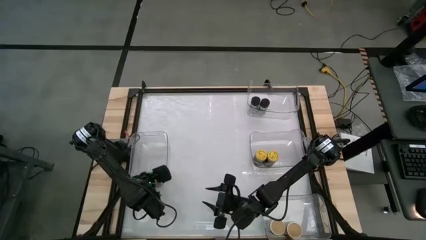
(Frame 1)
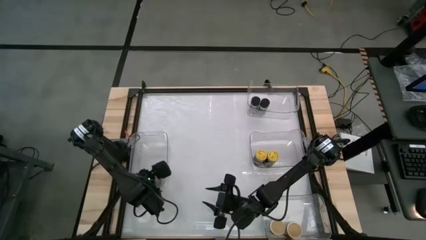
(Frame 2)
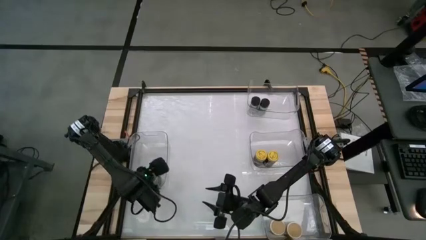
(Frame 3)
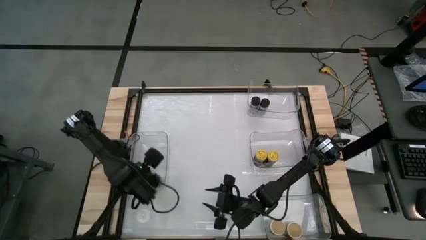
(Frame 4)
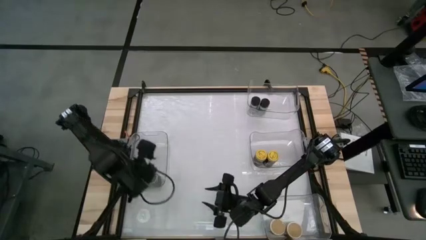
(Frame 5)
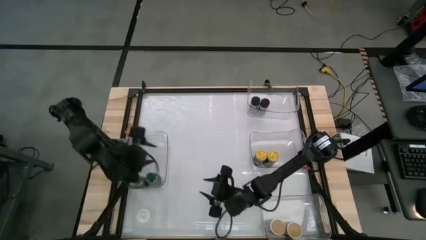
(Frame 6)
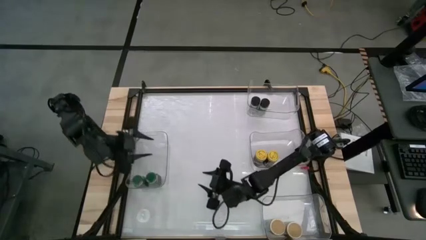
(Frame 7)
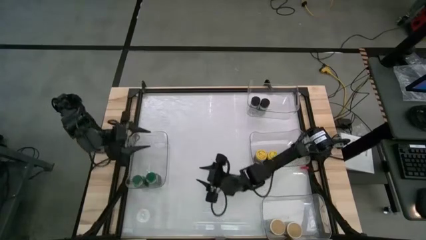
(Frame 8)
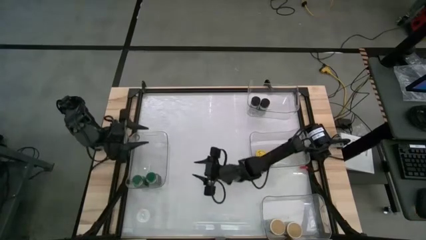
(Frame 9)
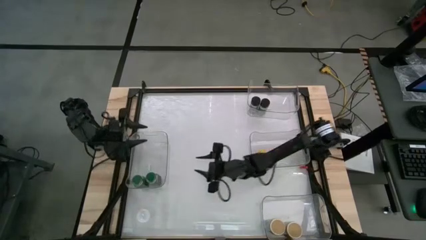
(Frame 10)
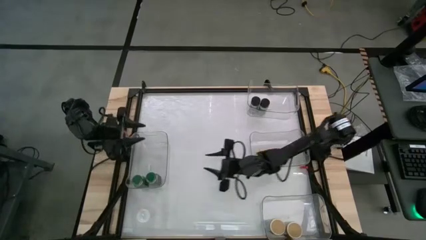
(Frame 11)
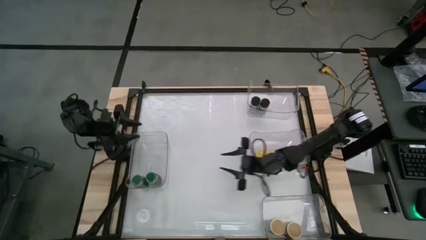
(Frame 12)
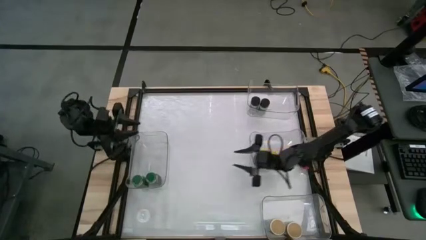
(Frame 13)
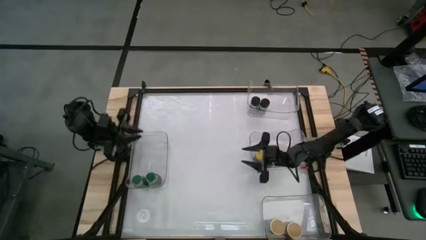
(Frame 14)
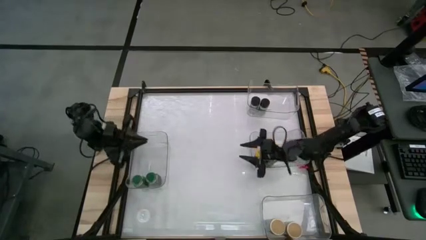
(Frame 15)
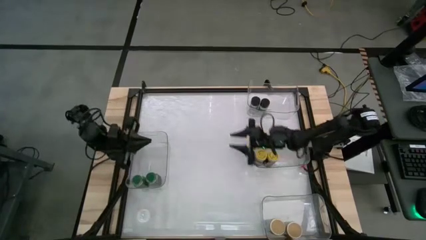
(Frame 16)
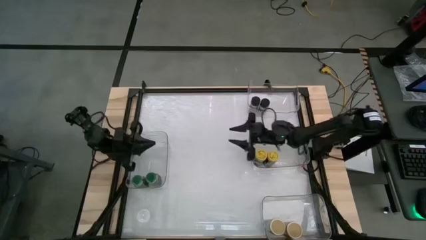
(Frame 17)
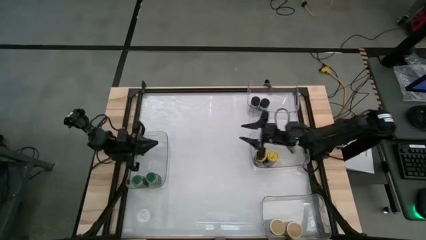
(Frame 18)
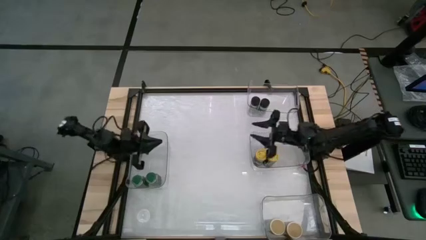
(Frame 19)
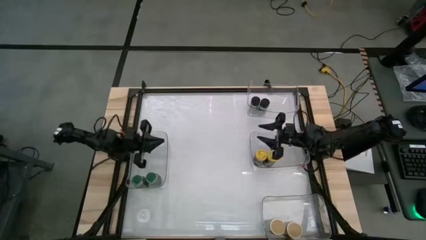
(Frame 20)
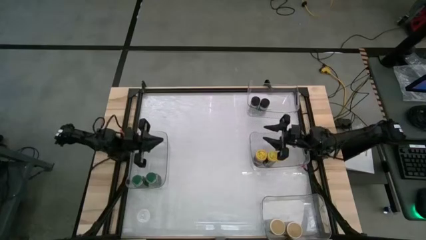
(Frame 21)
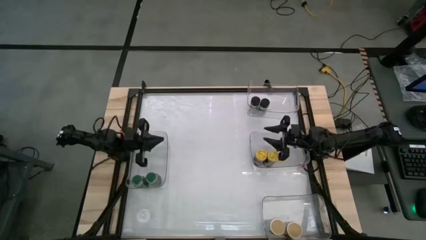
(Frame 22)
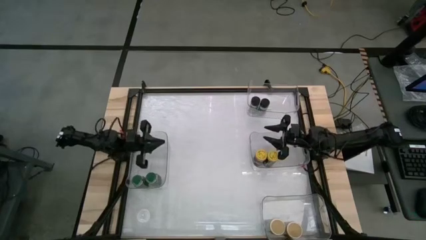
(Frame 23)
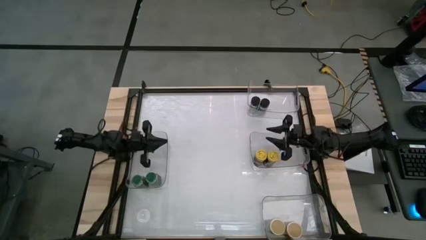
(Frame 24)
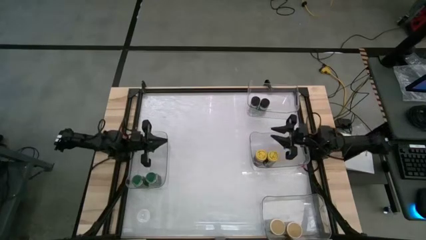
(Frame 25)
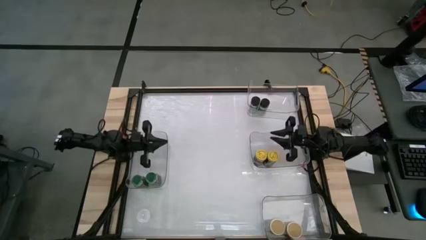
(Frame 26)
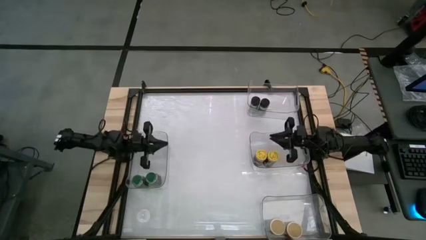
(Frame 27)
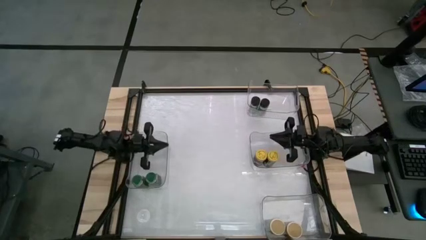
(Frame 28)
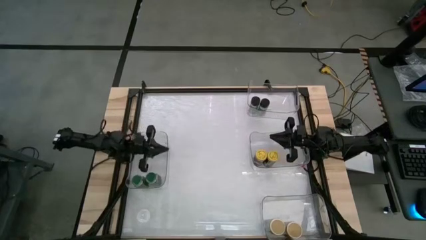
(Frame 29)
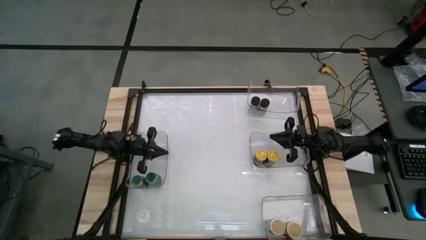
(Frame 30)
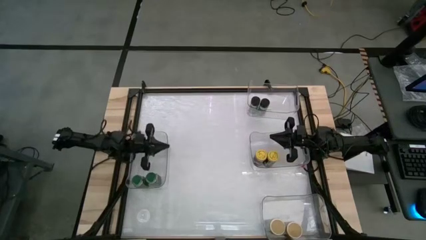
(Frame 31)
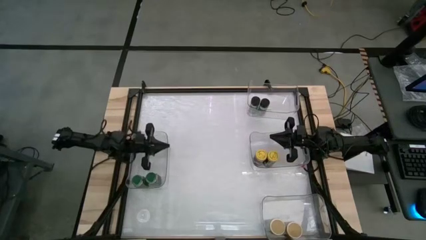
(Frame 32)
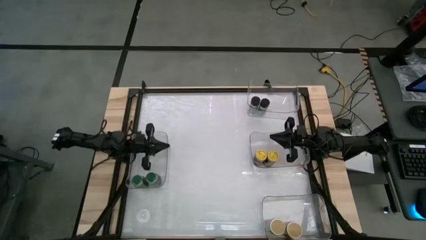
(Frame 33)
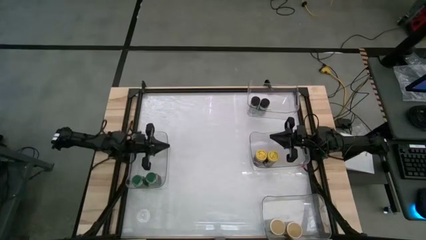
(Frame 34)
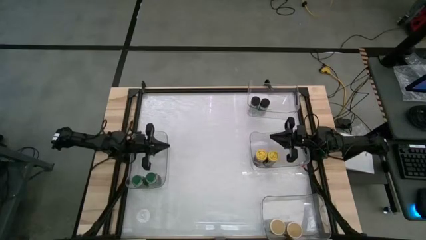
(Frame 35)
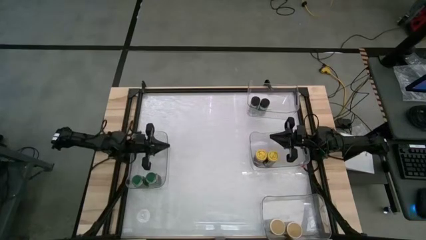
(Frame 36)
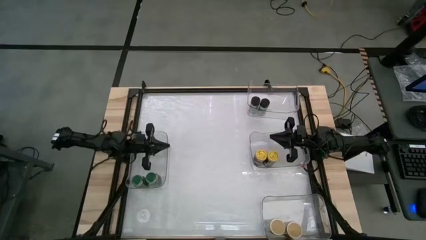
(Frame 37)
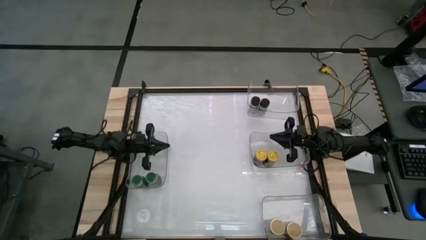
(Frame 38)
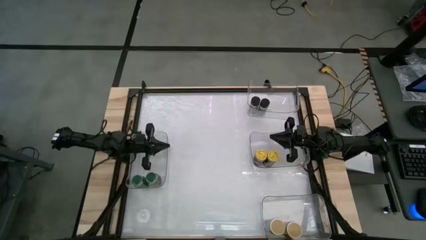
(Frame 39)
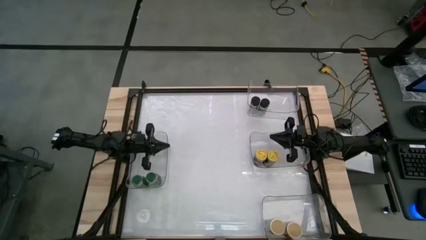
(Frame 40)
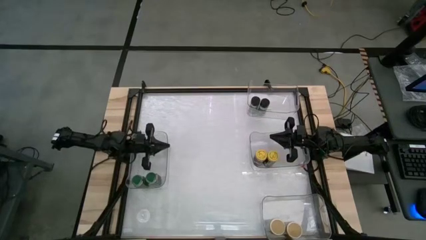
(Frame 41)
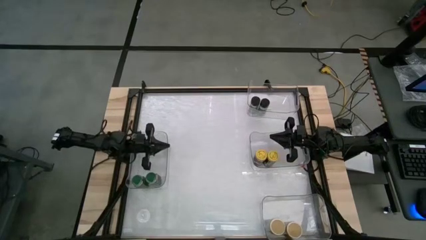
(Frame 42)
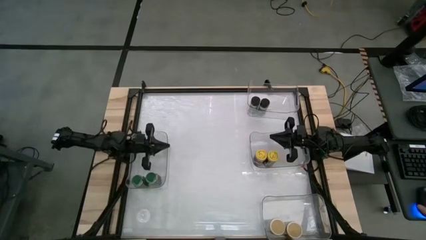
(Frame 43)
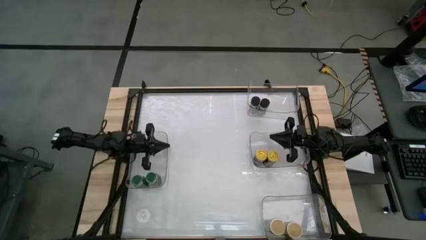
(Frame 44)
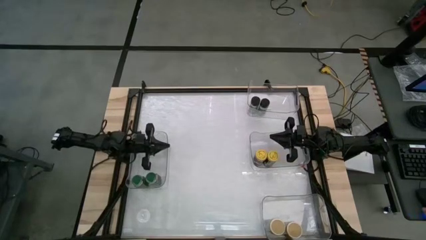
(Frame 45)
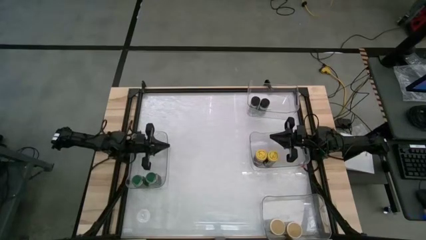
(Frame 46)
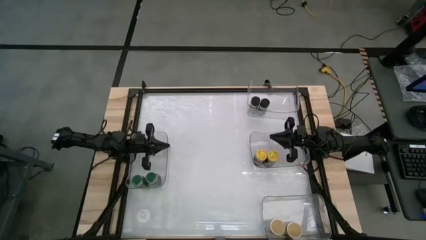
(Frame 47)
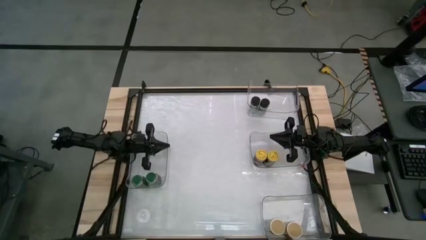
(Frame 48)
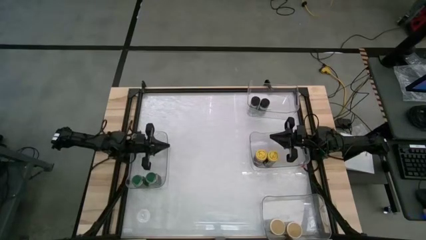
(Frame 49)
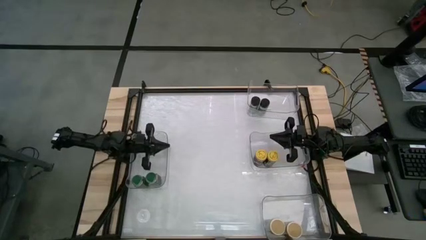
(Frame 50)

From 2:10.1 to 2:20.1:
Task: Sort spices by type
Return to Home Position
